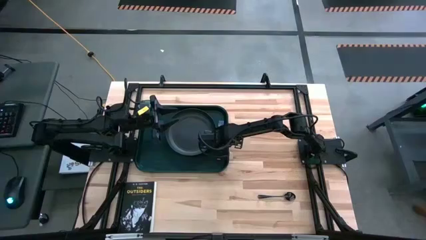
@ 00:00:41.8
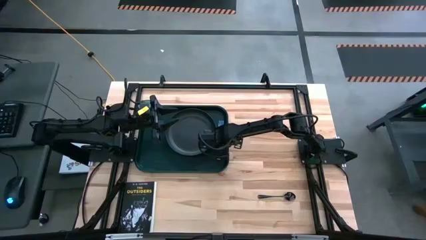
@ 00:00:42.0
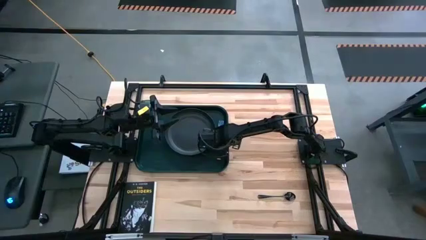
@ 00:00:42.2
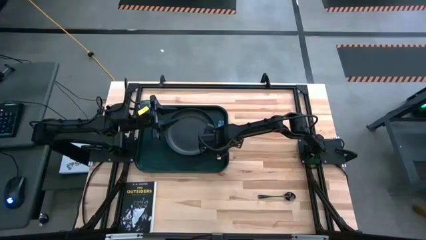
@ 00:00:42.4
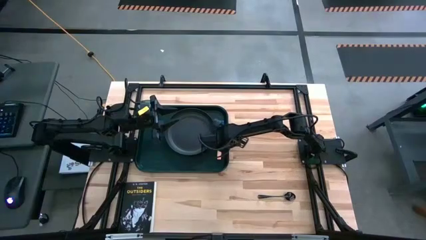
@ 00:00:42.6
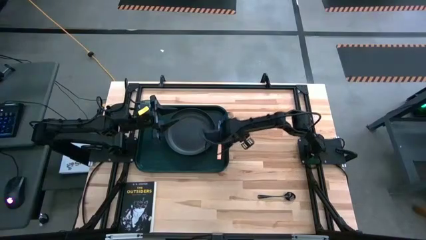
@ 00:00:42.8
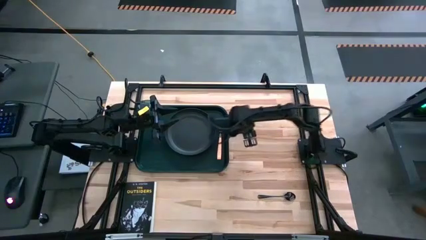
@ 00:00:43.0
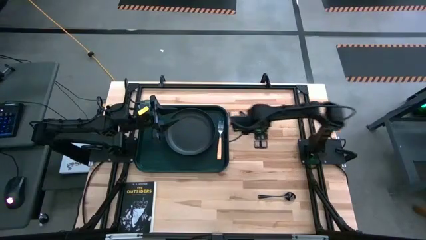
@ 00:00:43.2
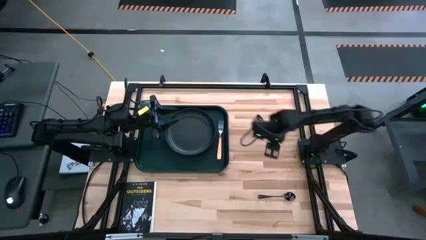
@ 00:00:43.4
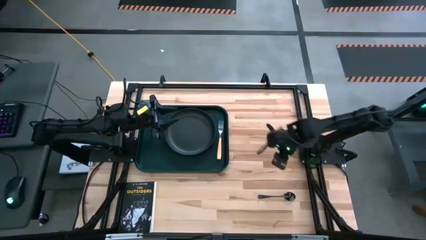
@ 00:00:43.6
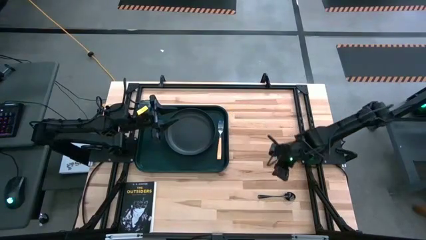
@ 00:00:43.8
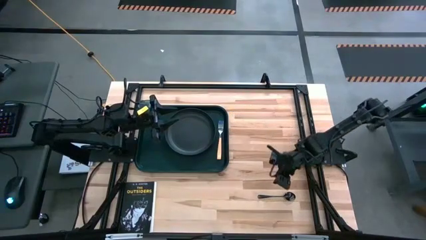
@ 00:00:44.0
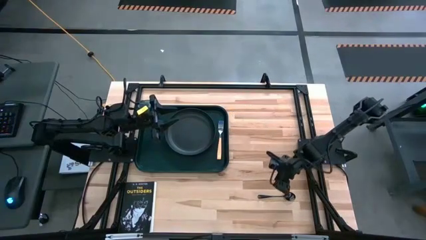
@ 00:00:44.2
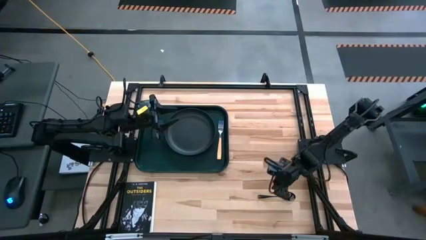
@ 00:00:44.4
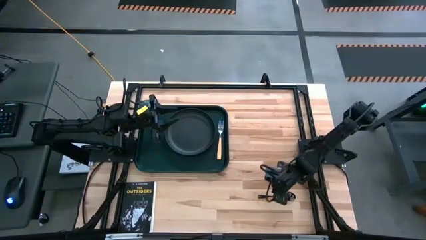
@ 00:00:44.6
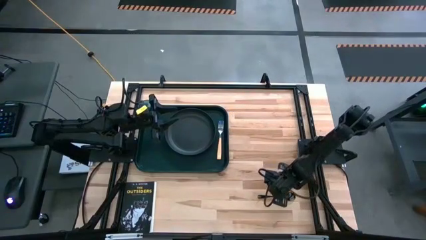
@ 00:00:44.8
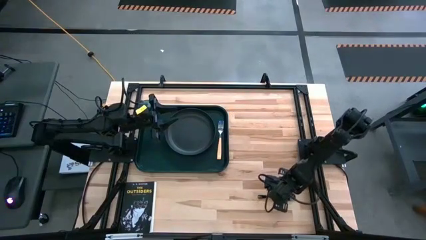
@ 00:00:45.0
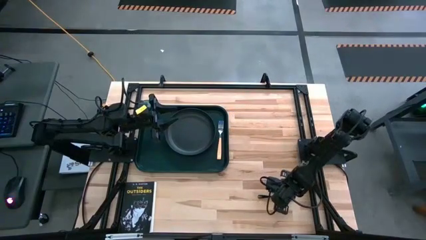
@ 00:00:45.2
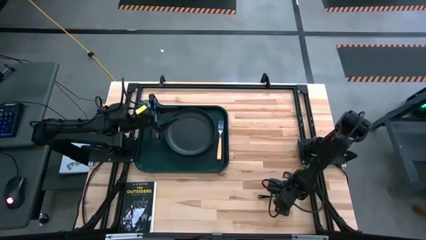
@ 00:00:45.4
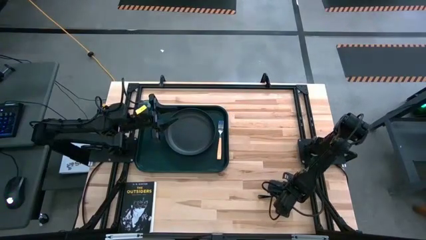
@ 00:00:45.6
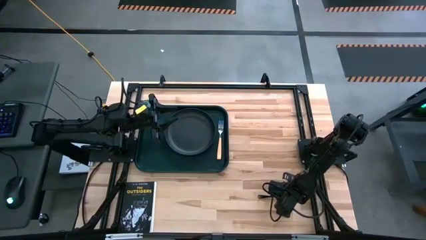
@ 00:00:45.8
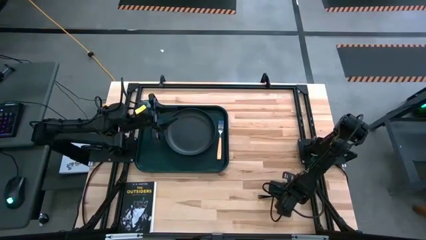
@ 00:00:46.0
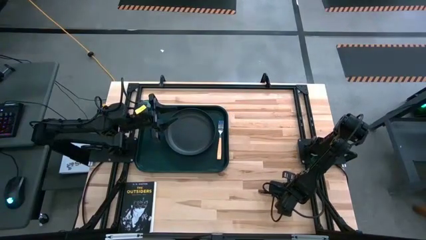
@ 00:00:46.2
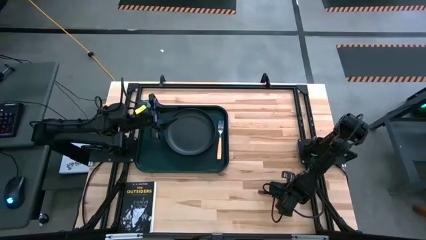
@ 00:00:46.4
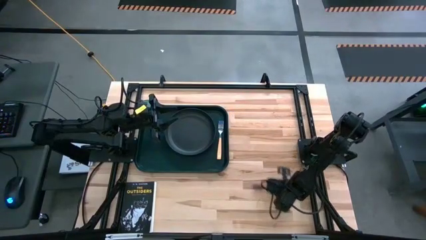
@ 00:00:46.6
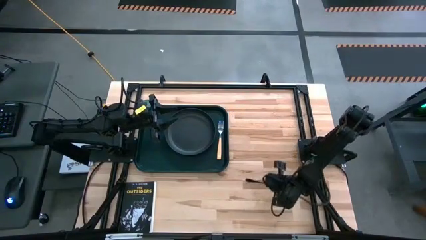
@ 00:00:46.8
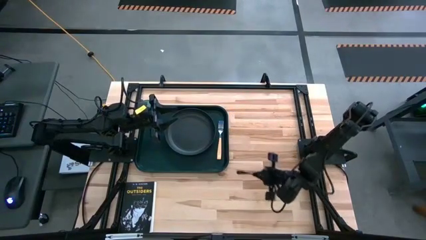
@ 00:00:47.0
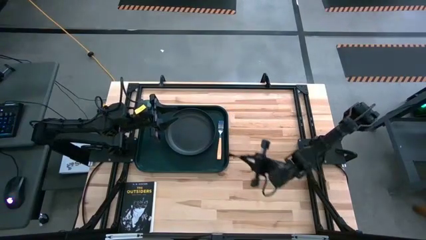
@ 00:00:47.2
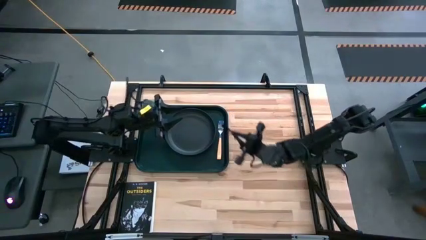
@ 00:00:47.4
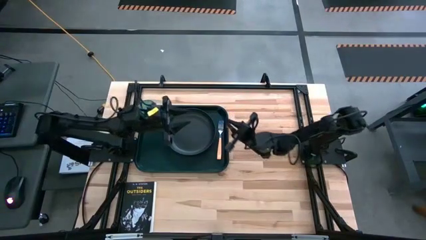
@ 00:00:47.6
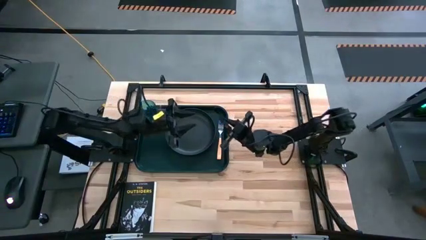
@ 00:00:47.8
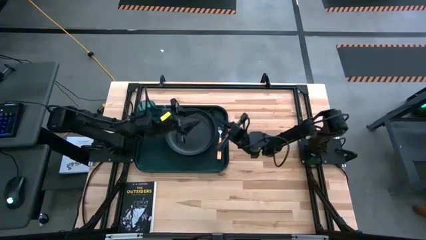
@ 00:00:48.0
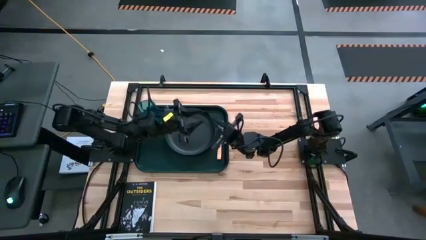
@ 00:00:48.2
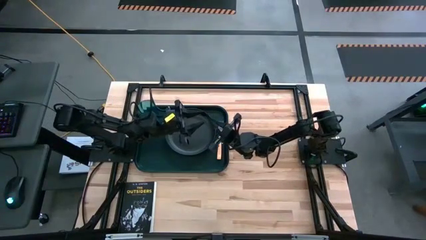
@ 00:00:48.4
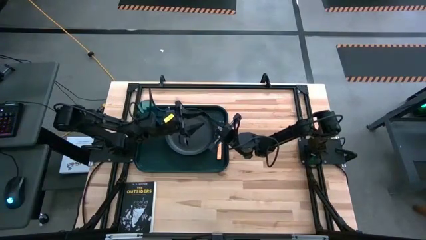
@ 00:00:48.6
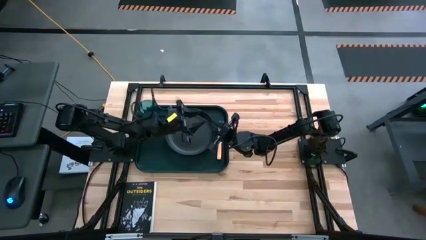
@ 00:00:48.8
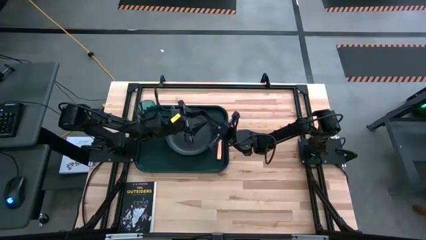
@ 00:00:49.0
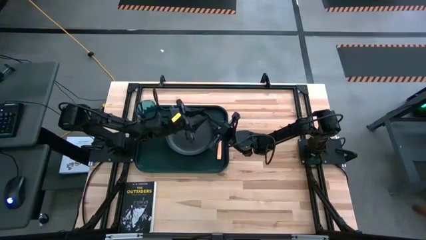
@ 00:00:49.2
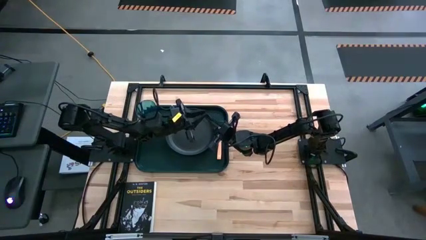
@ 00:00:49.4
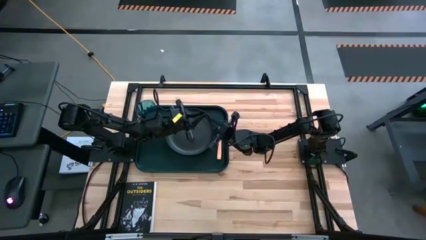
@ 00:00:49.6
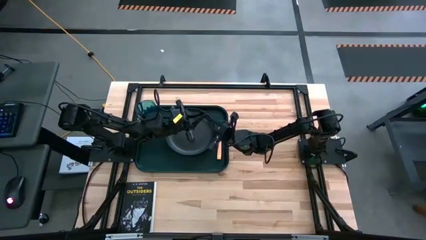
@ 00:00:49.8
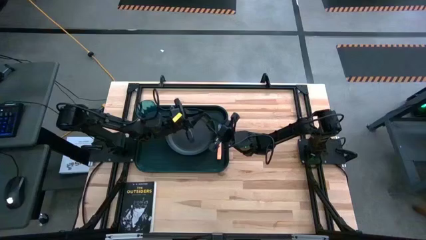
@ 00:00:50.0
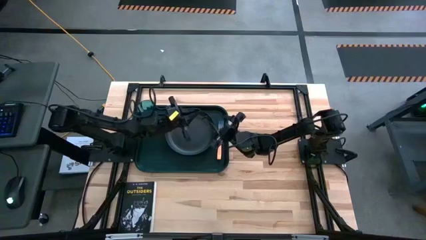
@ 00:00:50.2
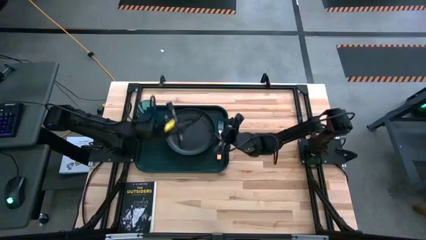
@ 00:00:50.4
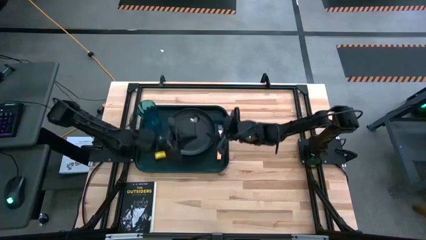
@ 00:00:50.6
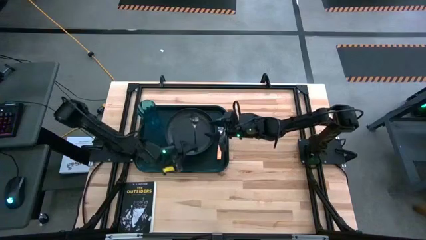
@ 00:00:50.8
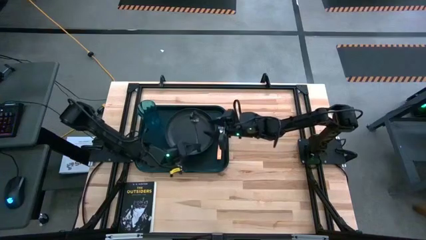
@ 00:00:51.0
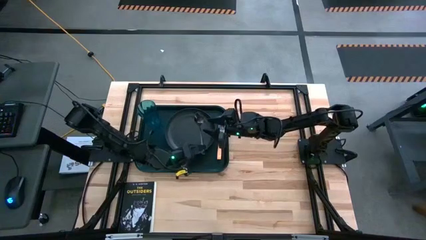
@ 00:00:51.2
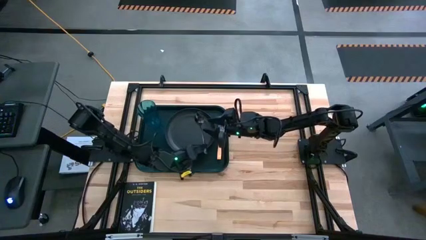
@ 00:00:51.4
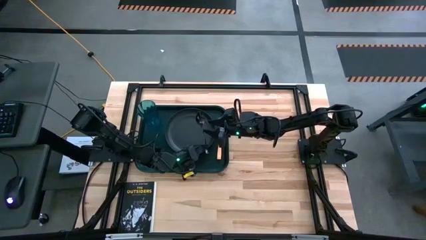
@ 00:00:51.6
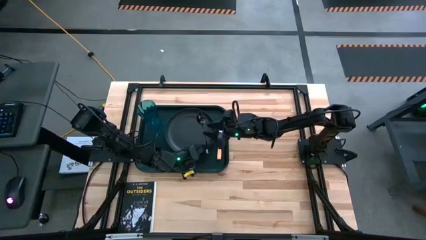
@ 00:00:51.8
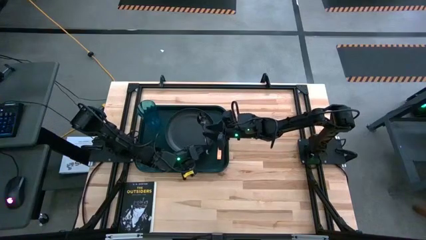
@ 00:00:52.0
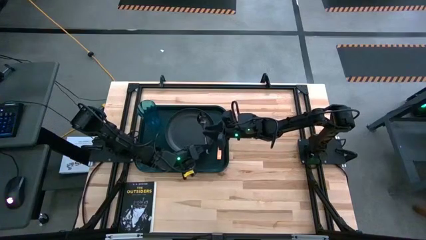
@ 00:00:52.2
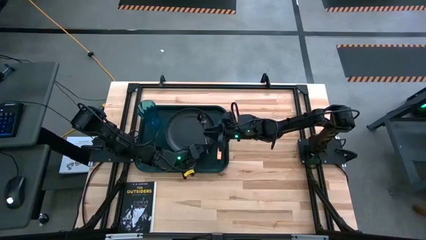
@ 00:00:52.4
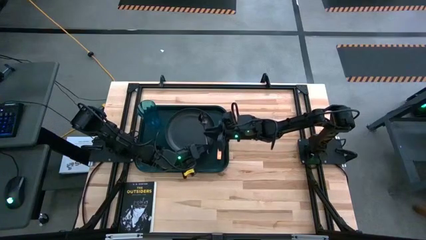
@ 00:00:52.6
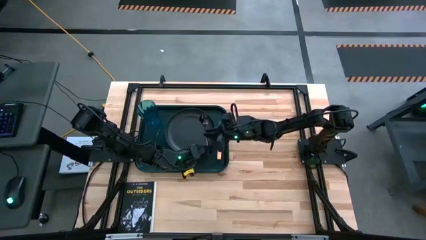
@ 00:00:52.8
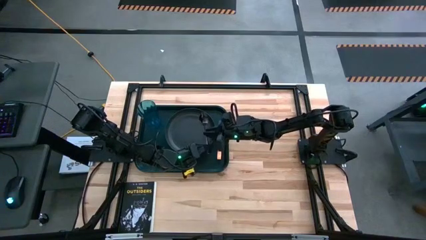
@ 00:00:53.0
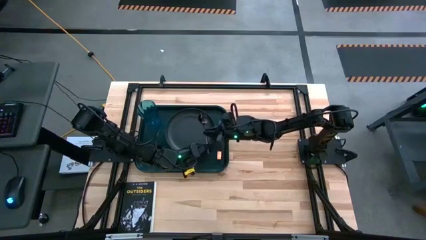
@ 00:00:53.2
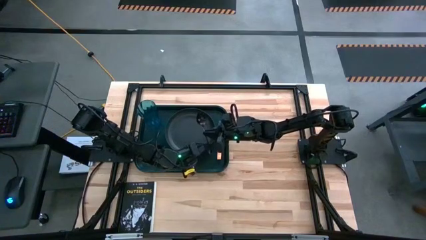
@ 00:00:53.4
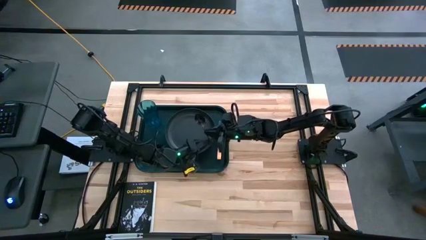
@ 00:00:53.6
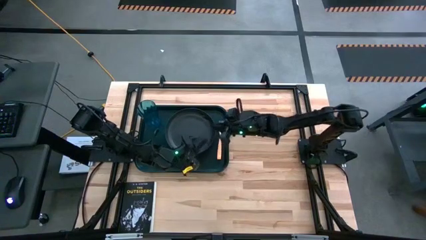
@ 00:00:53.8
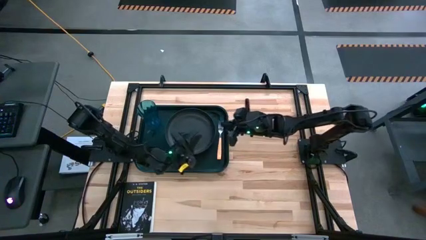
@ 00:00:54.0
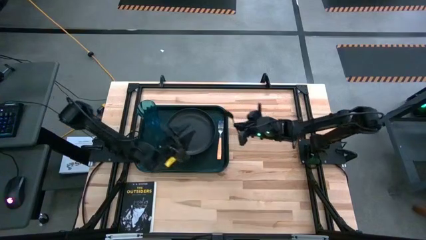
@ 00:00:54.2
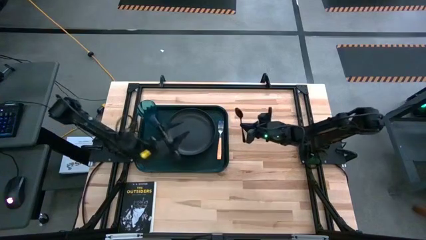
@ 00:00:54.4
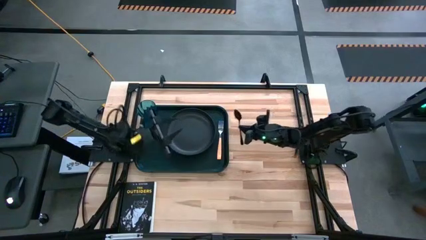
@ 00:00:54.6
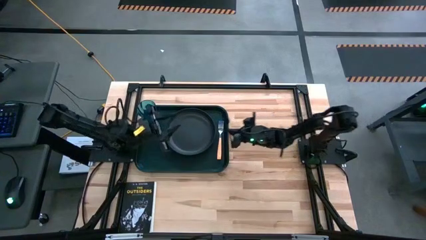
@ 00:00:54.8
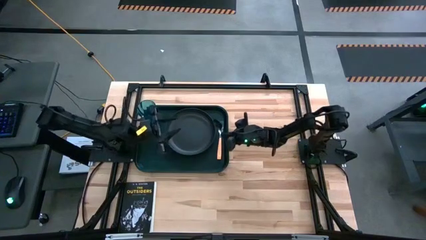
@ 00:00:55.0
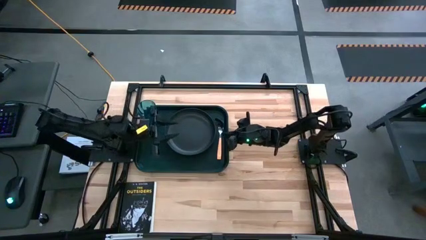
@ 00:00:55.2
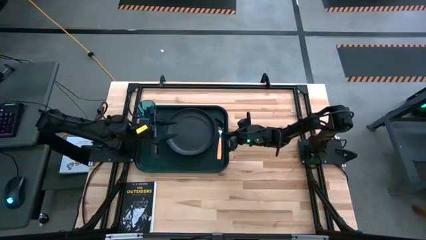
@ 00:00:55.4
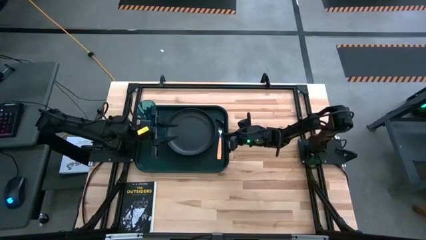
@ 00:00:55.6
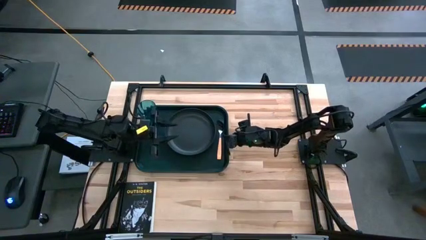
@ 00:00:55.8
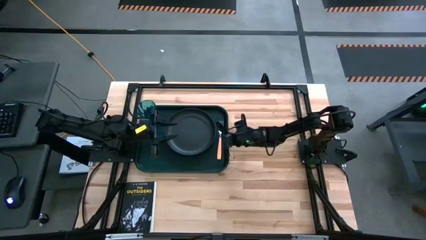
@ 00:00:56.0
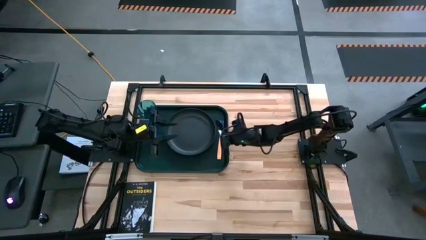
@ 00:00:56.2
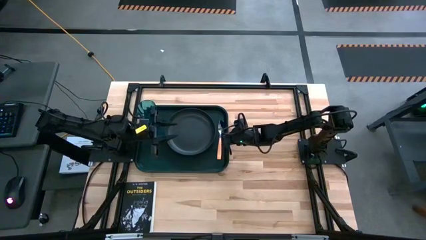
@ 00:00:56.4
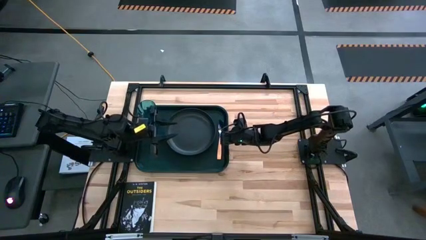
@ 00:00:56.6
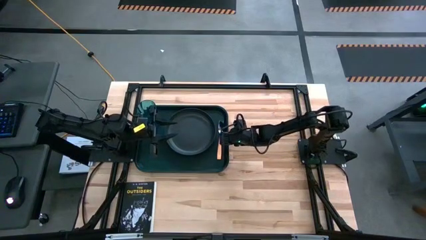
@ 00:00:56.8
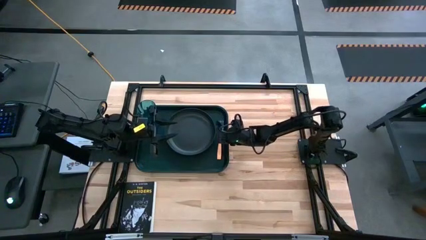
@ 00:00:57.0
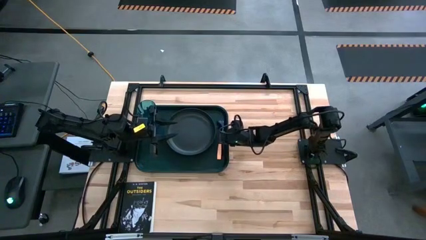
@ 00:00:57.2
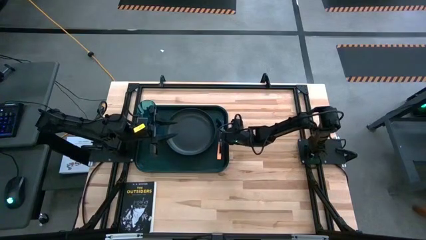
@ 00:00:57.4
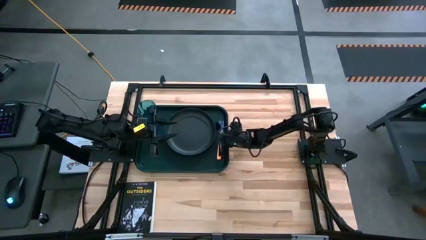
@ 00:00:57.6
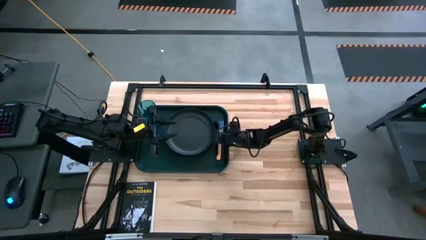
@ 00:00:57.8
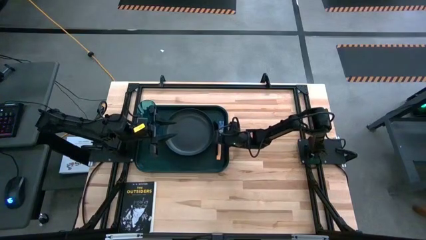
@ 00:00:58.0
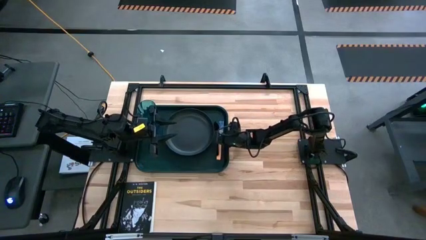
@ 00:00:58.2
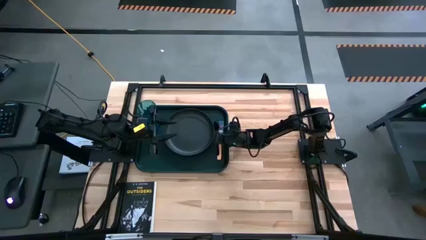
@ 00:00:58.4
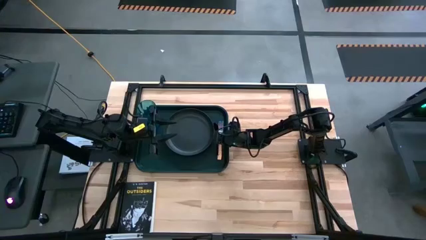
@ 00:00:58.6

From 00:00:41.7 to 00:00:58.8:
Task: Pick and place plate/cup/fork/spoon on tray
Put the black spoon on the black tray
